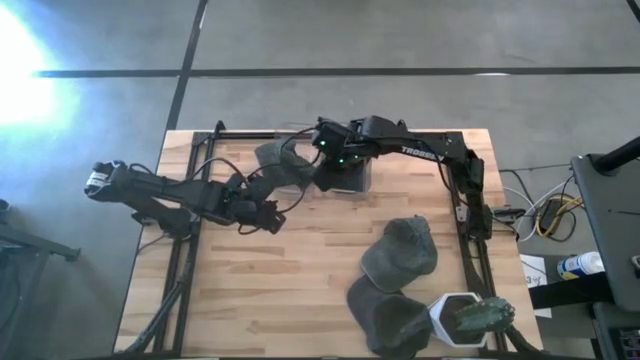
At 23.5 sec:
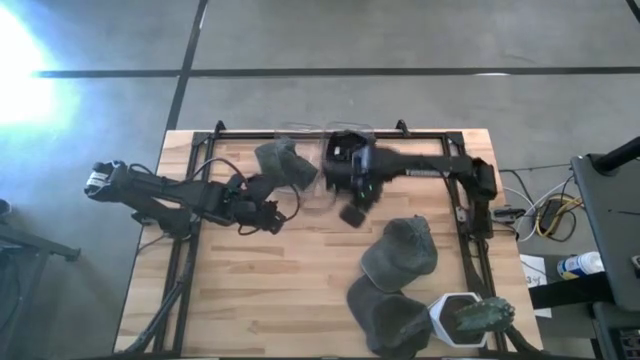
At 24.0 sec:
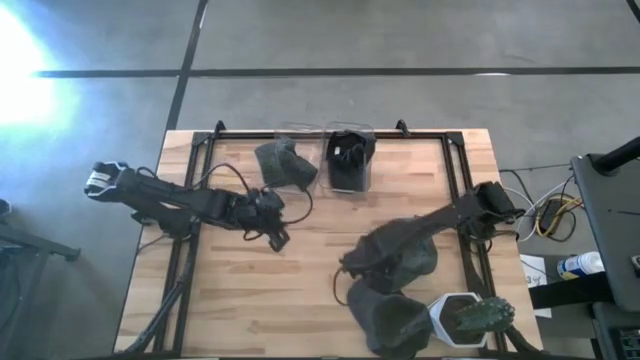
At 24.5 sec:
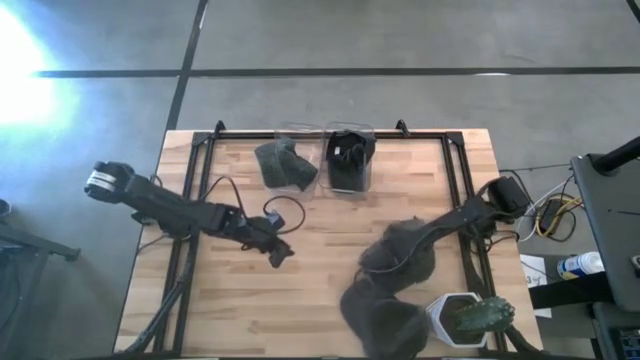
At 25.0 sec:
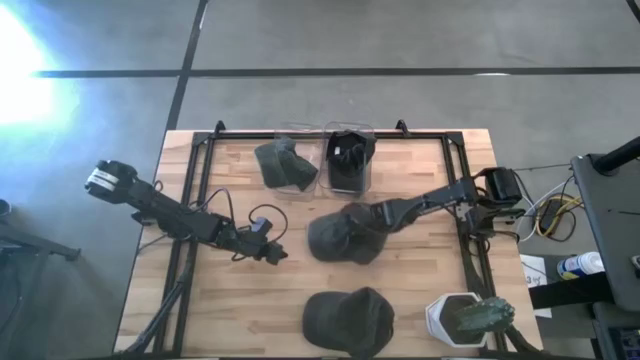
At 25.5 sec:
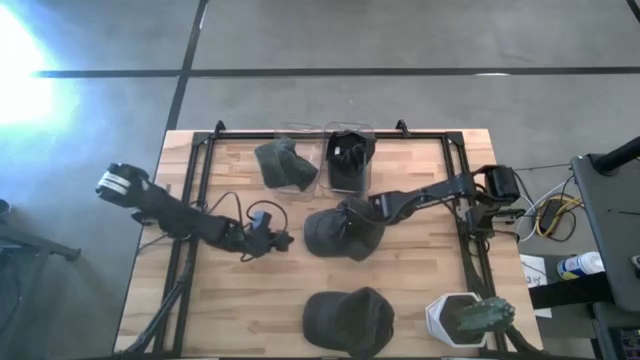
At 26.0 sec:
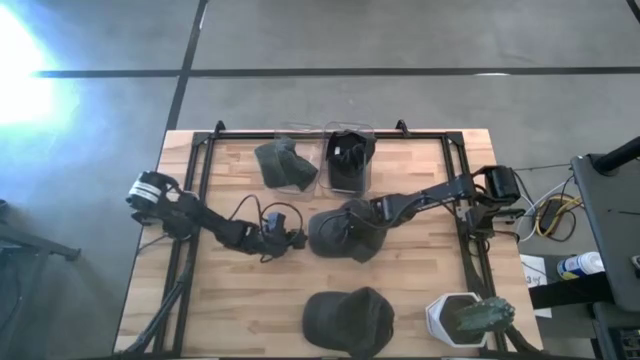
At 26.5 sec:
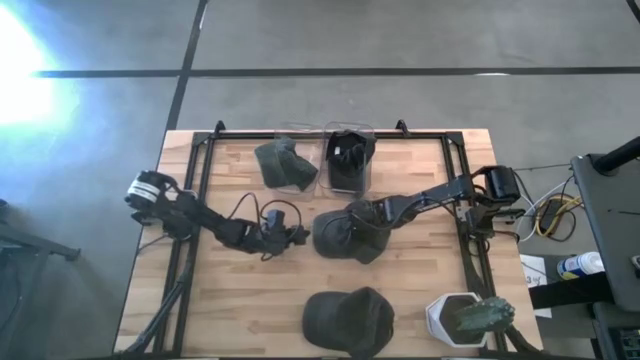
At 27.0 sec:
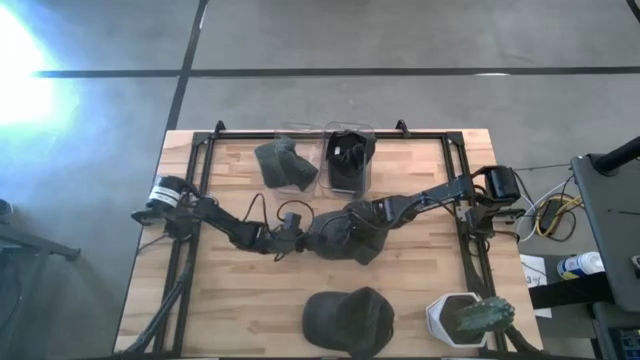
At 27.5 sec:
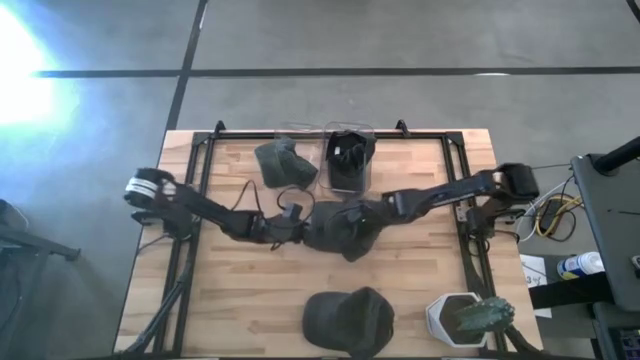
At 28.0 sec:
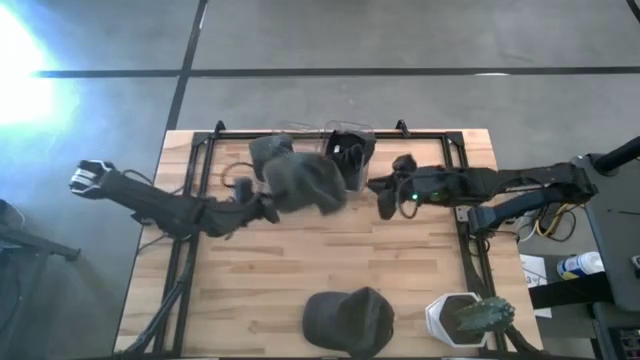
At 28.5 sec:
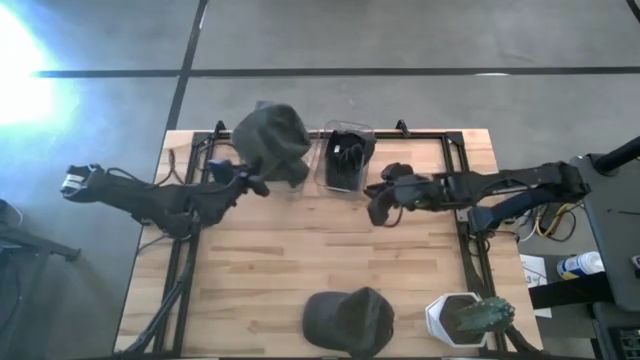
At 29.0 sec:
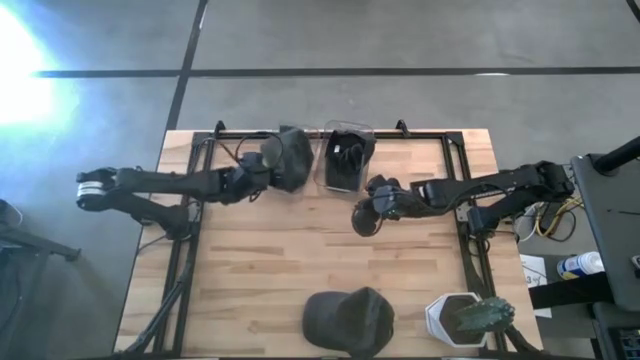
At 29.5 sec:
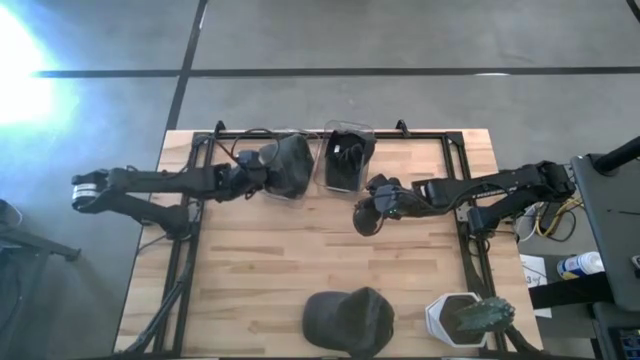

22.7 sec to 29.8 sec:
Task: Pick & Place hat
Put the gray cap into the left transparent bin

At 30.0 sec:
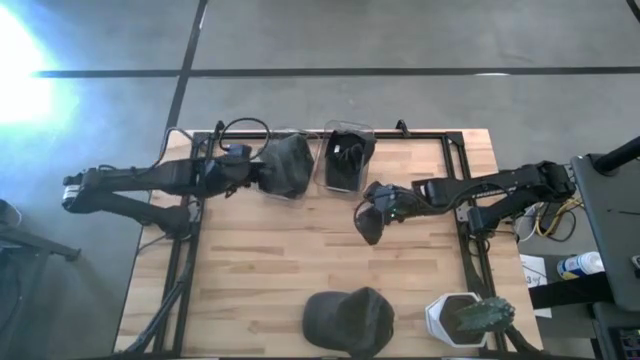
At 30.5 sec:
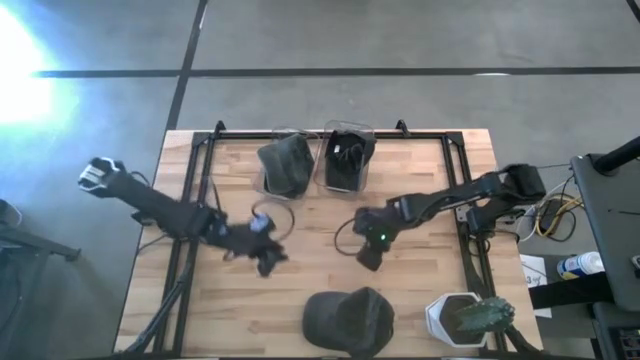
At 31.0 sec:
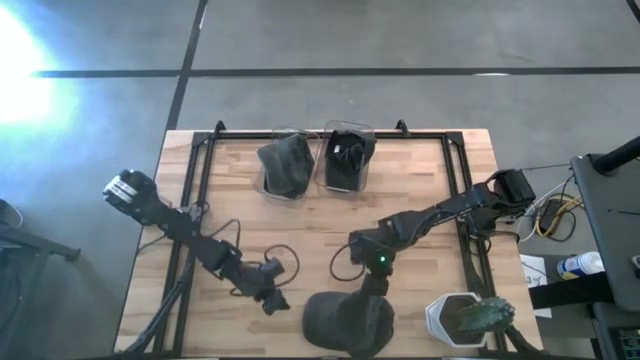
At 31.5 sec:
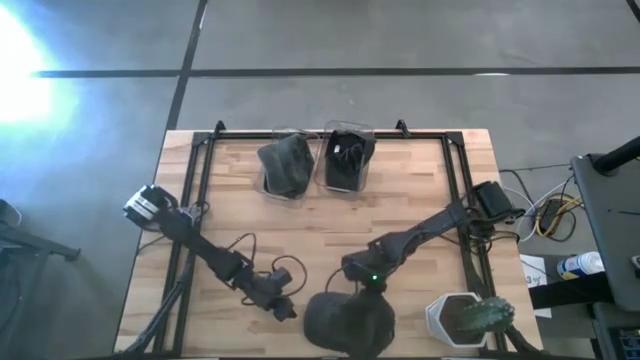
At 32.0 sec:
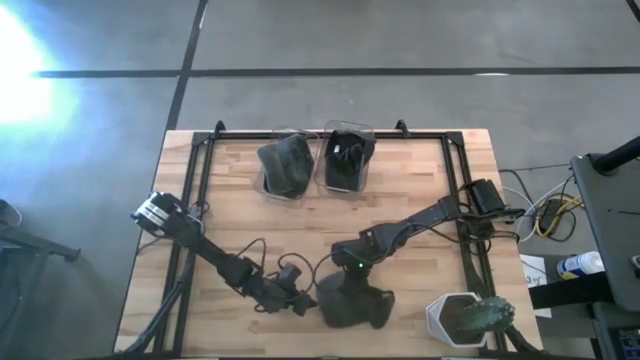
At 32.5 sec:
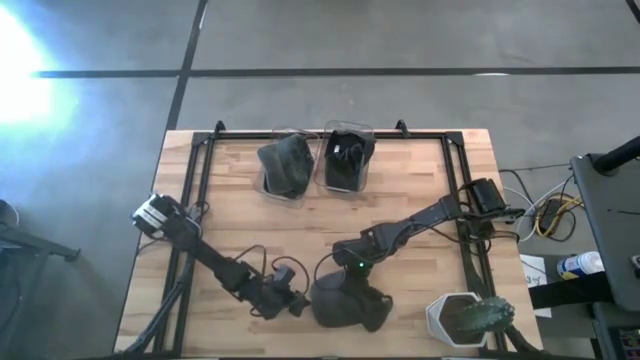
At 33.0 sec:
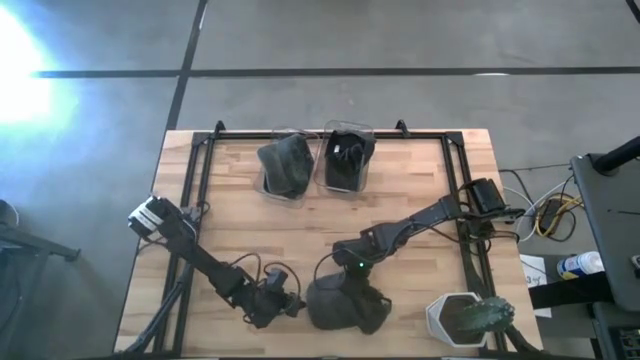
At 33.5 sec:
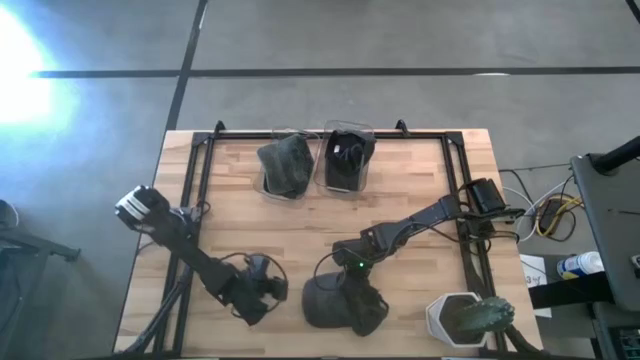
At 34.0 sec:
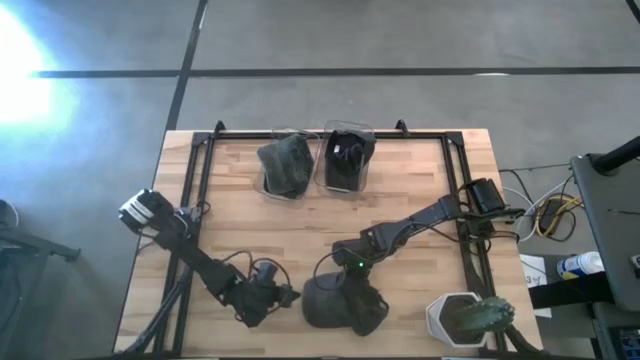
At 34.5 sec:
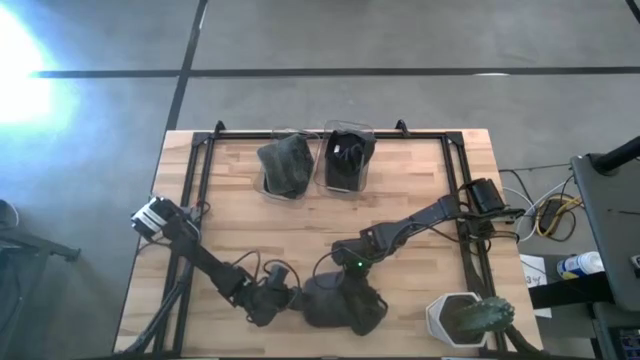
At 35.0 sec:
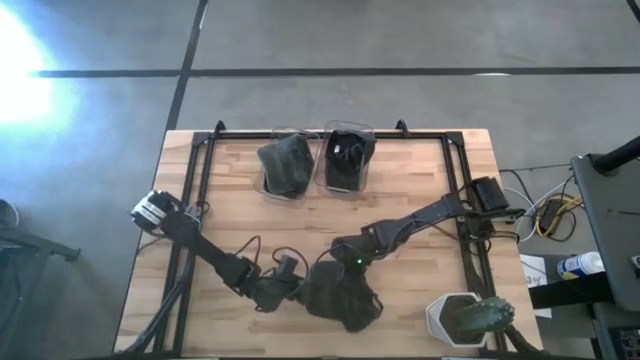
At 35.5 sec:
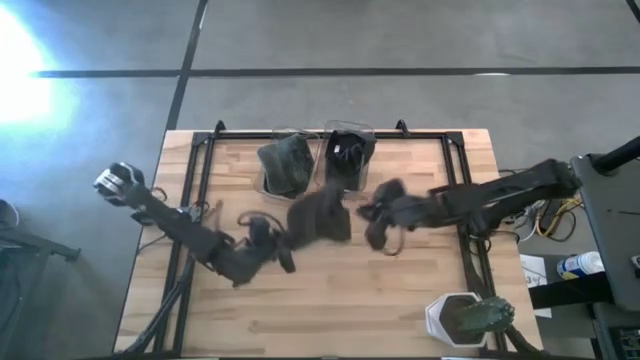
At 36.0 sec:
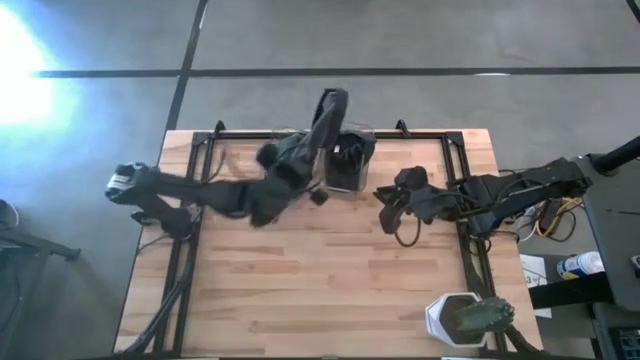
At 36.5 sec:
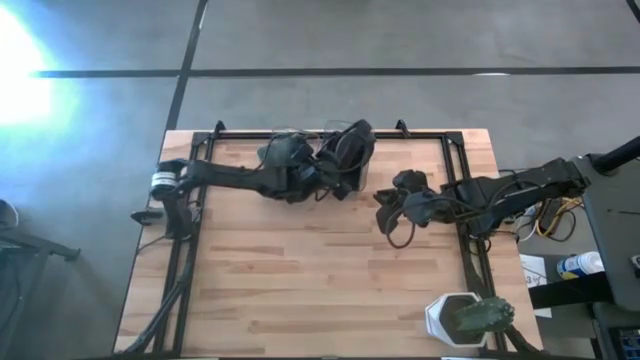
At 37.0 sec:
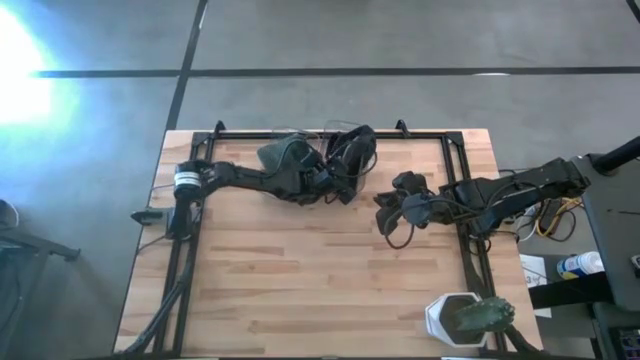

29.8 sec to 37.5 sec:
Put the black cap into the right transparent bin

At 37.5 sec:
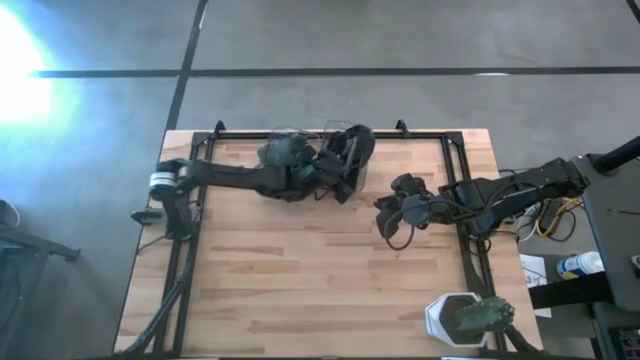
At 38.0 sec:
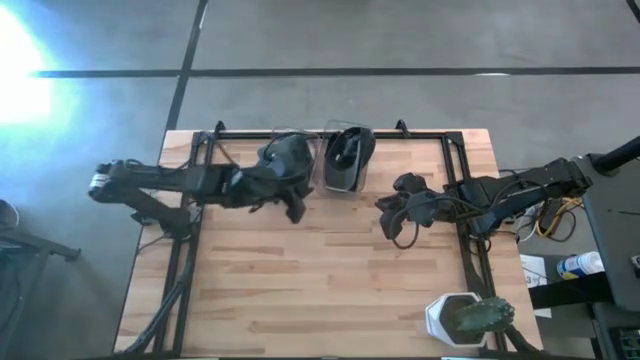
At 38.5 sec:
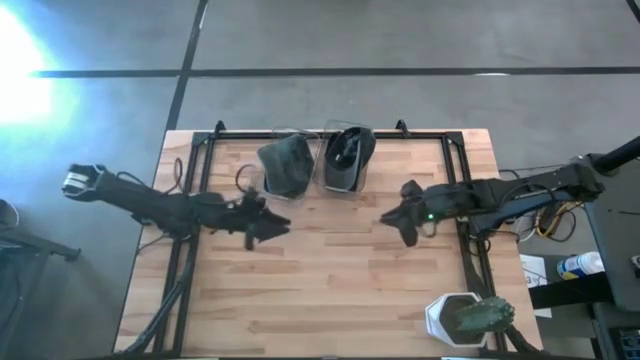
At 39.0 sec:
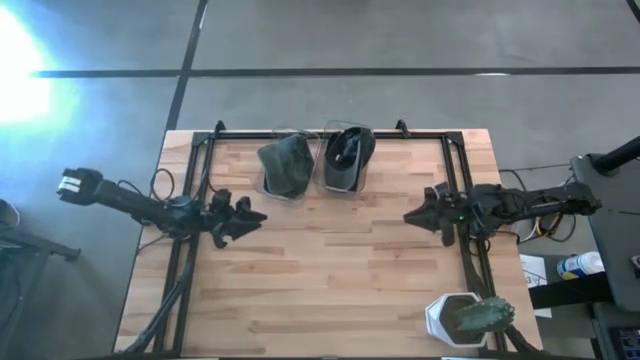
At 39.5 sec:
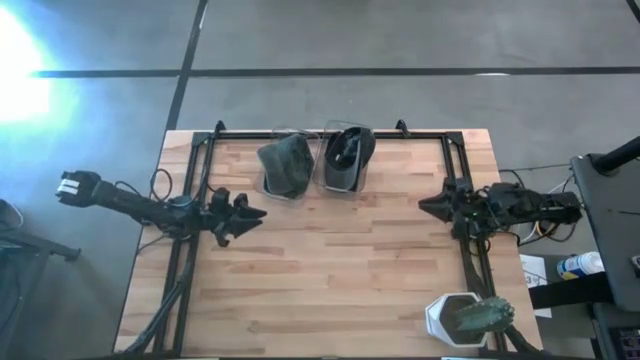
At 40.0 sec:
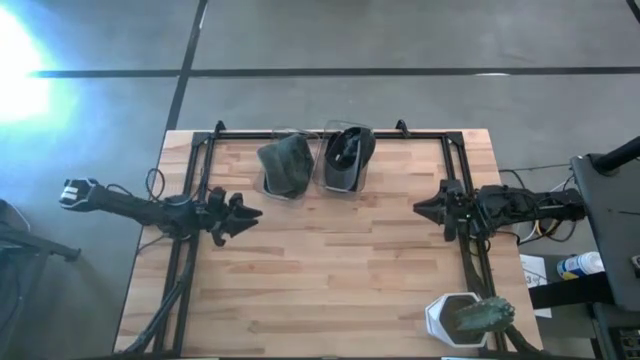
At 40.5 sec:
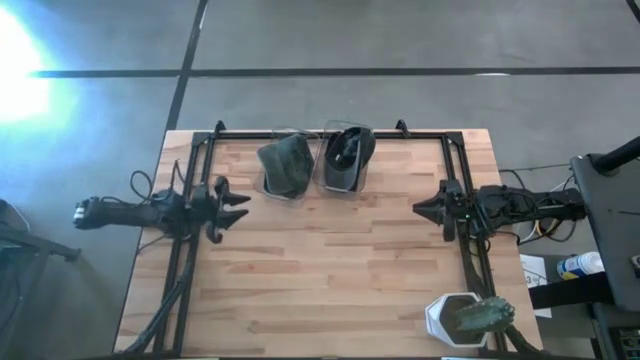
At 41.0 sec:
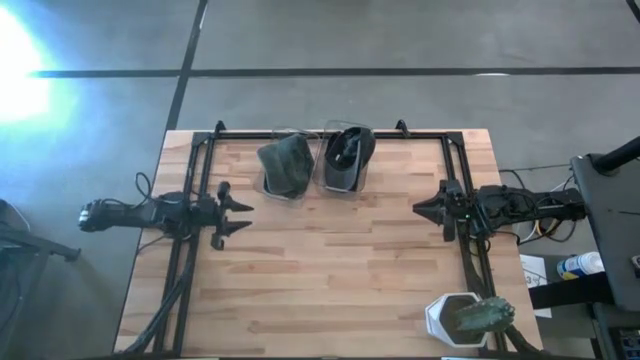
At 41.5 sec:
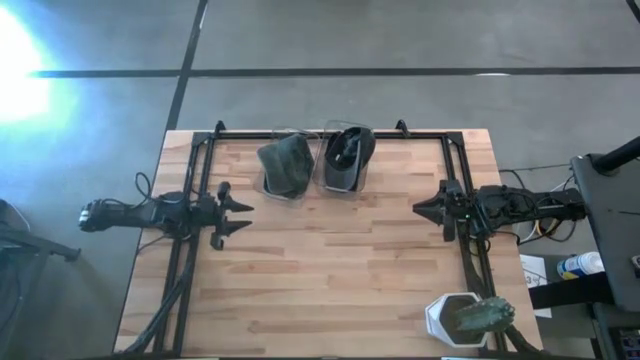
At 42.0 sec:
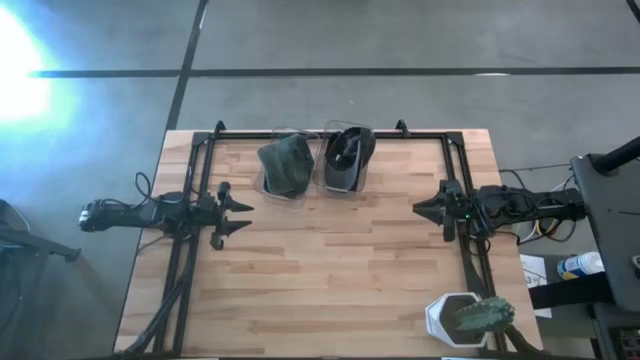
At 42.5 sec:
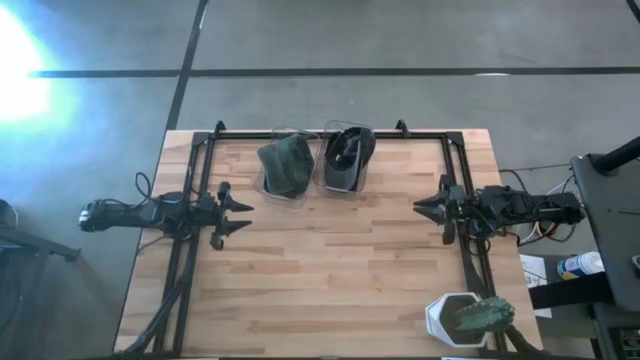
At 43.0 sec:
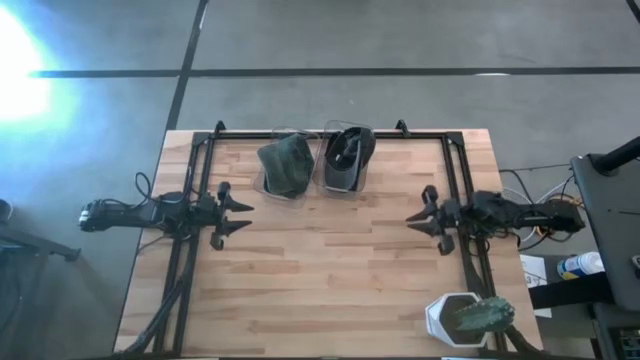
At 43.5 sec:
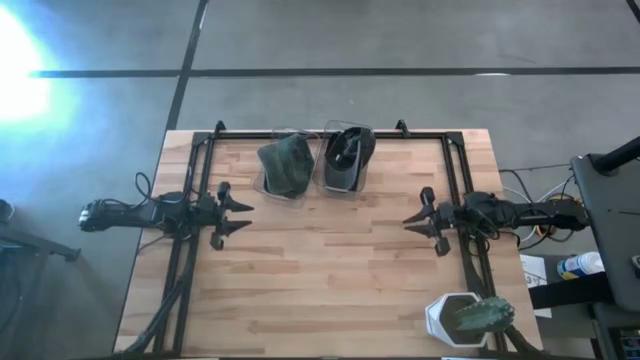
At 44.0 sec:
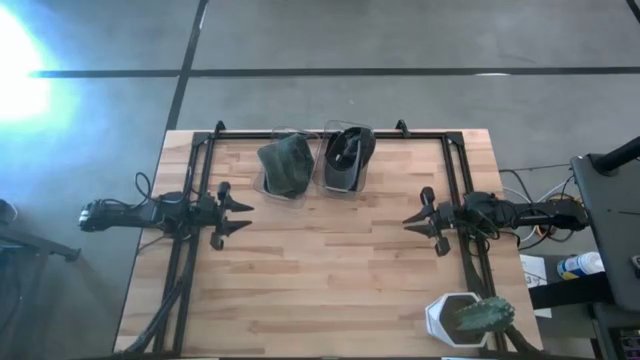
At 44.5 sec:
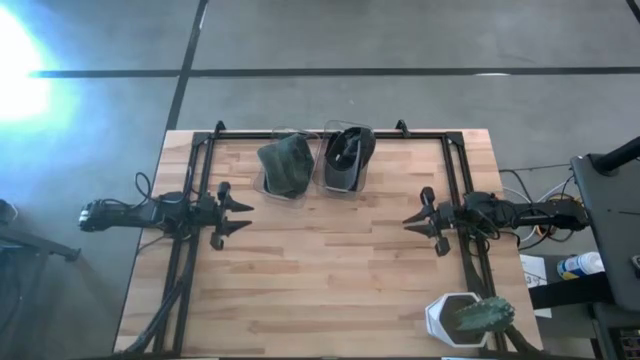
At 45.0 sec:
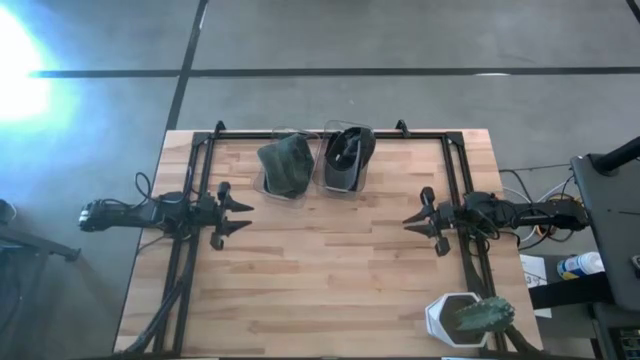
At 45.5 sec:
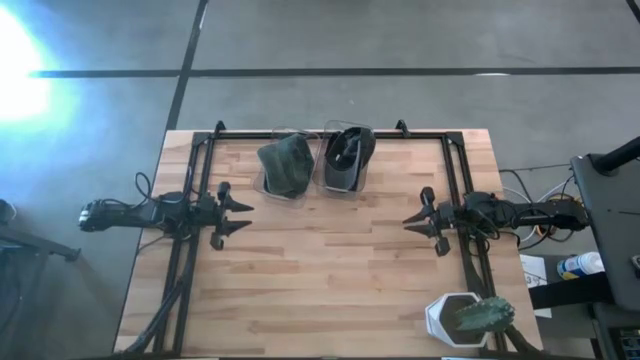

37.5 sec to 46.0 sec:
Return to Home Position
